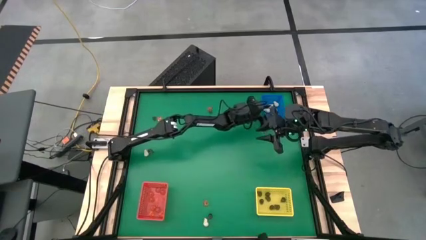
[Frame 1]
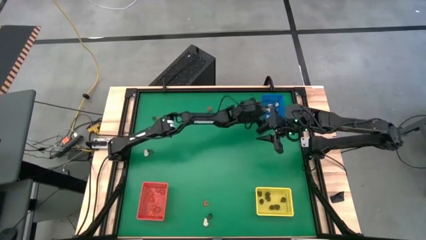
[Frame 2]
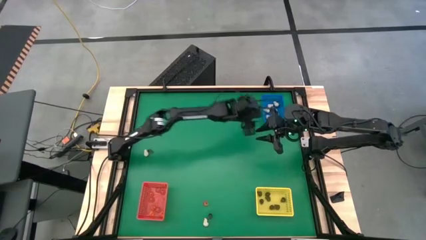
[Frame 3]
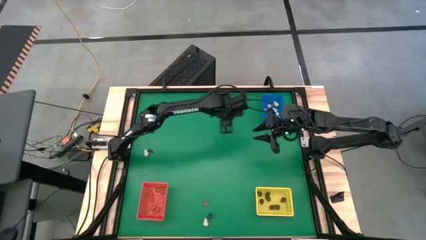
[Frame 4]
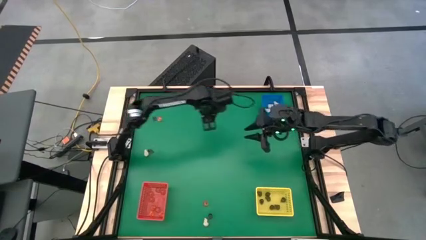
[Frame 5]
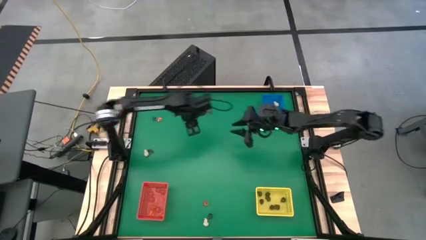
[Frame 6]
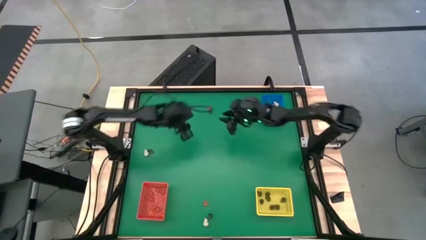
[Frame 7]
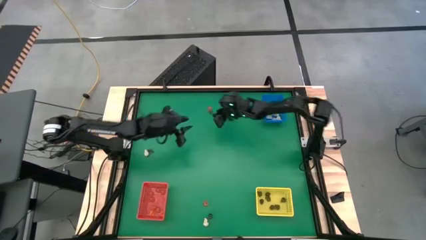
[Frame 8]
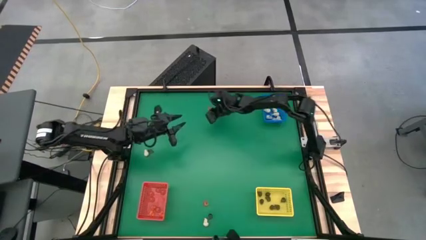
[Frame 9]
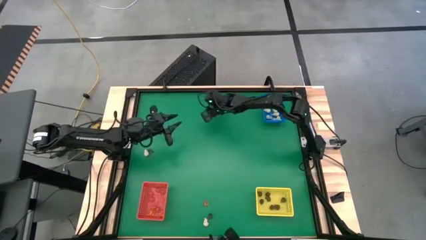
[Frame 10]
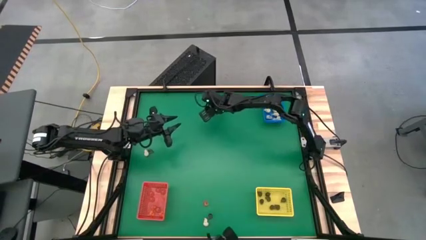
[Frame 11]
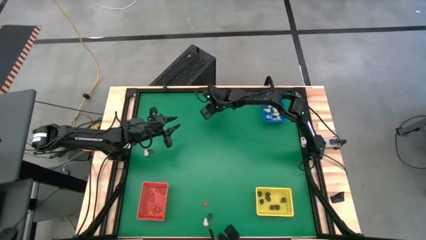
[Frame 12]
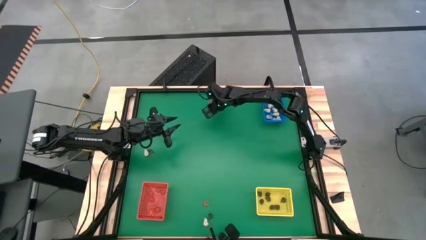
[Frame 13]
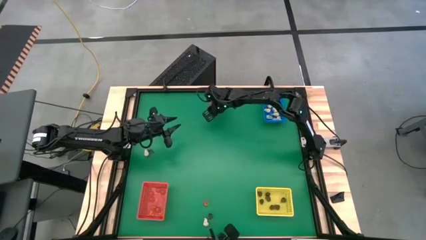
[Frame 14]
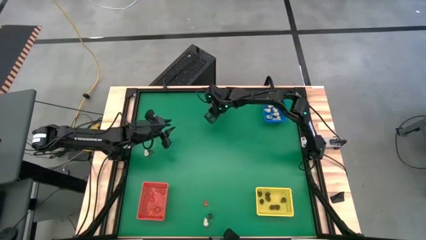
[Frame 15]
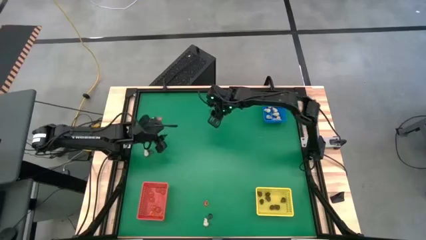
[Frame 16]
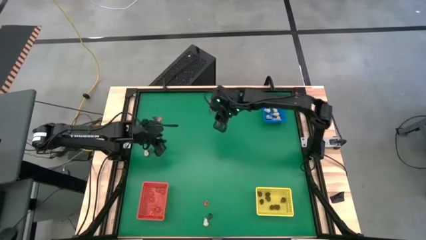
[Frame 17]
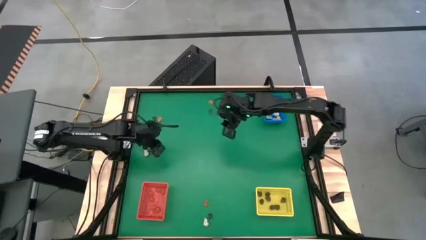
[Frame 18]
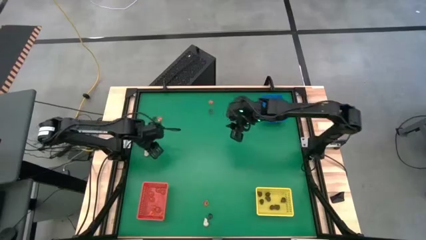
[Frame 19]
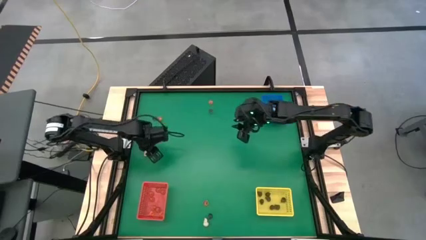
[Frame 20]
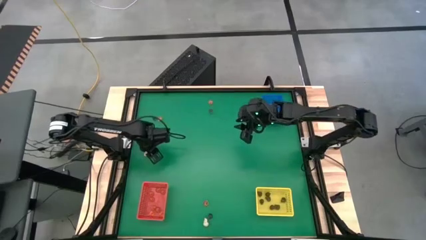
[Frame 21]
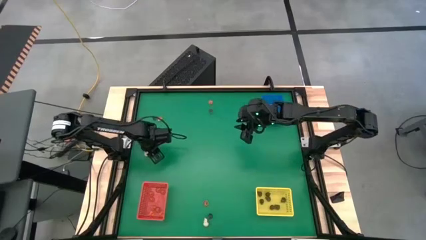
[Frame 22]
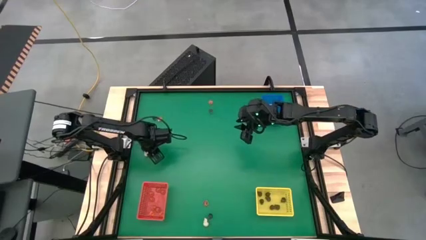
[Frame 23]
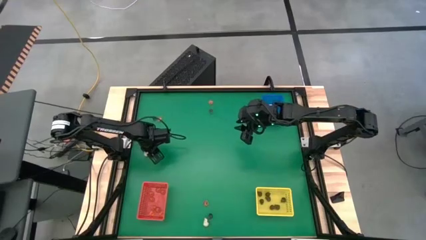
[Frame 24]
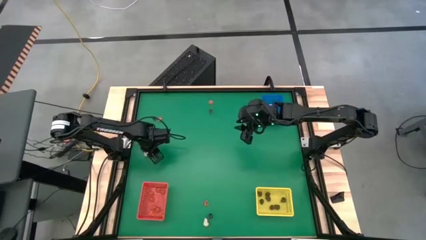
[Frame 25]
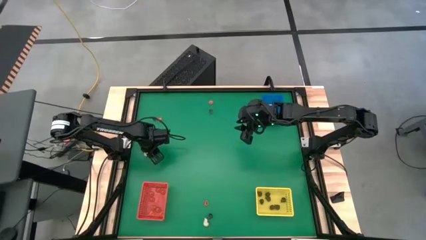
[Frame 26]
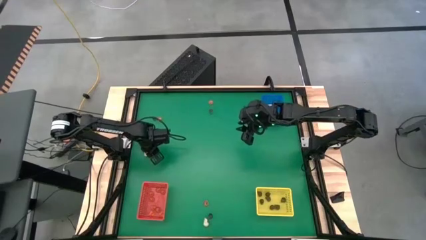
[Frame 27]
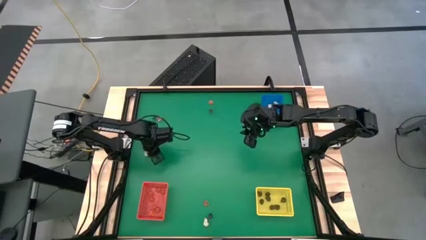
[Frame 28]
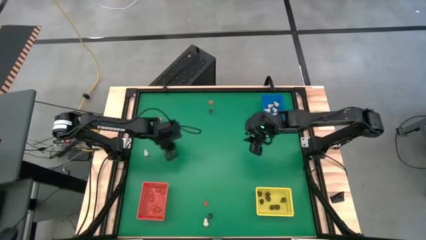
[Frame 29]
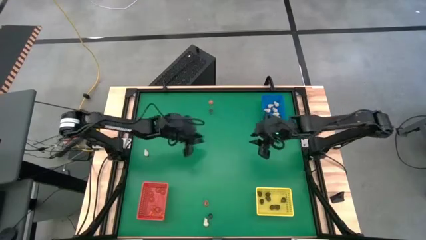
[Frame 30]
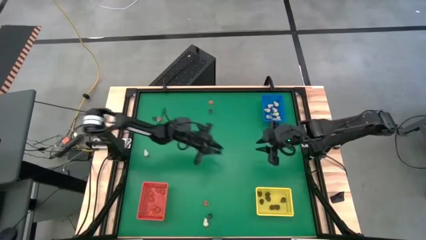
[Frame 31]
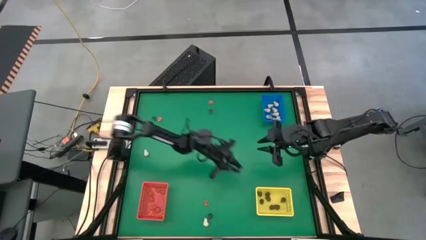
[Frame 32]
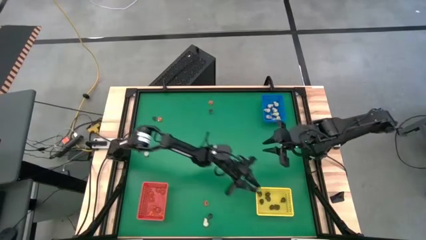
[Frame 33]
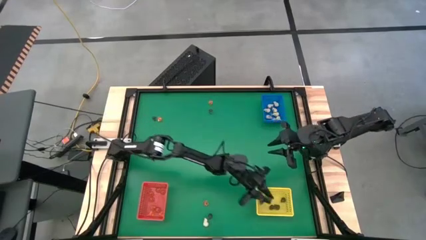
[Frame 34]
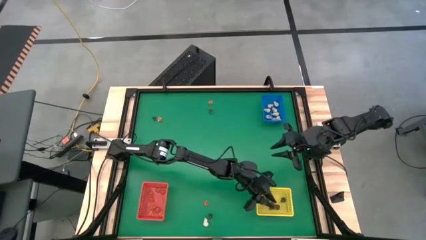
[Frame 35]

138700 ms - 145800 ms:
Task: Sort Halloween decoration
Put the black skull toy into the yellow bin

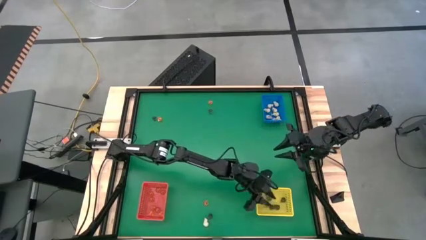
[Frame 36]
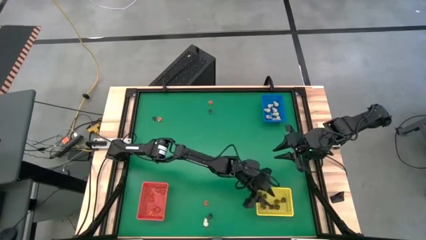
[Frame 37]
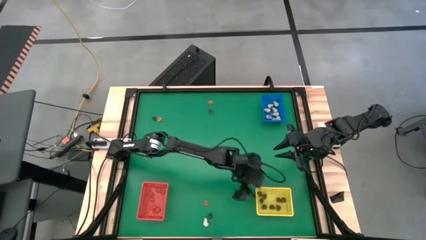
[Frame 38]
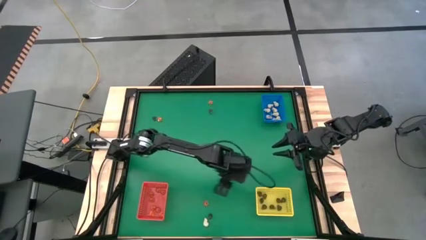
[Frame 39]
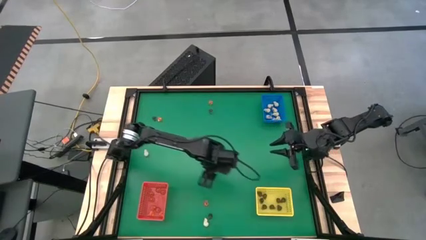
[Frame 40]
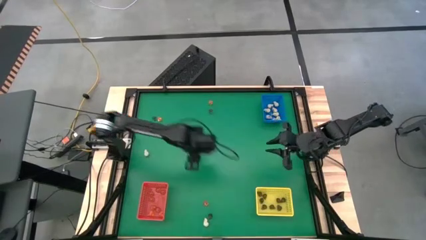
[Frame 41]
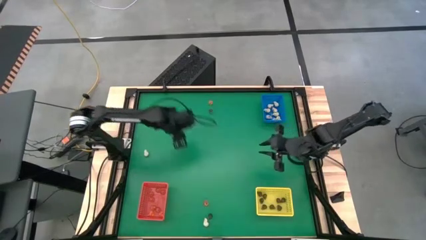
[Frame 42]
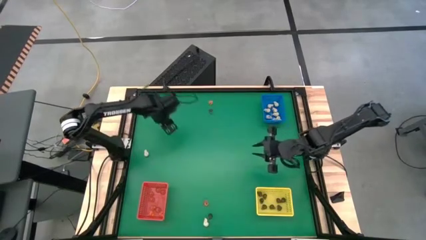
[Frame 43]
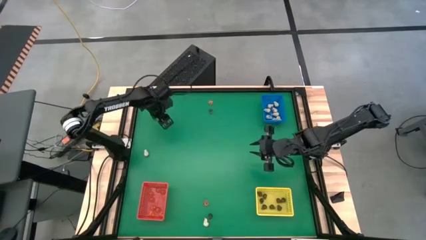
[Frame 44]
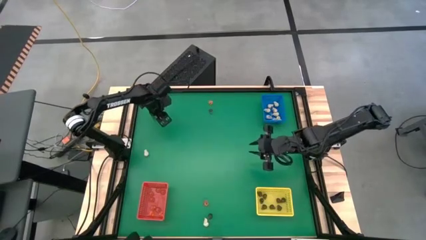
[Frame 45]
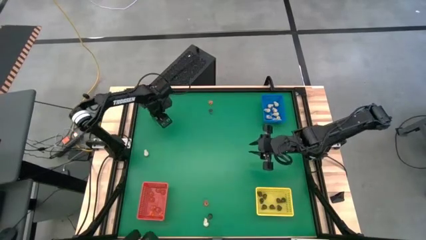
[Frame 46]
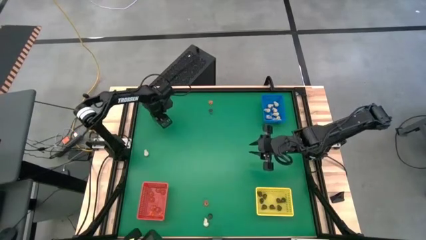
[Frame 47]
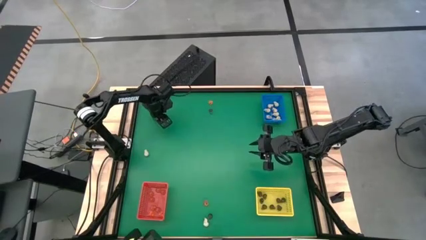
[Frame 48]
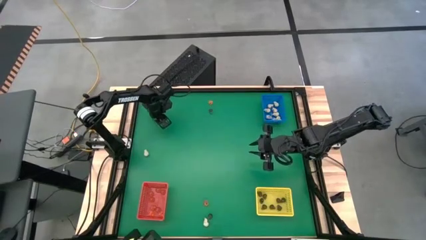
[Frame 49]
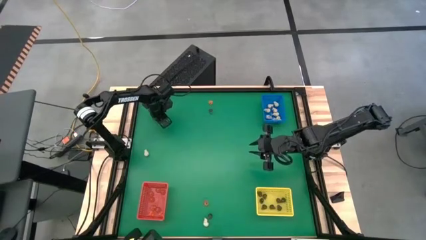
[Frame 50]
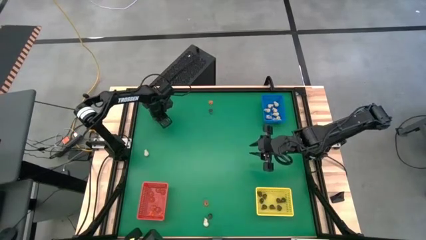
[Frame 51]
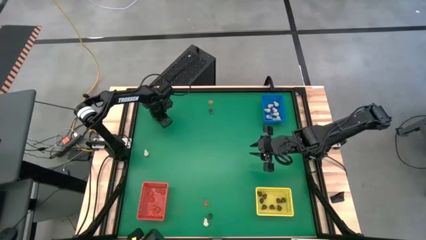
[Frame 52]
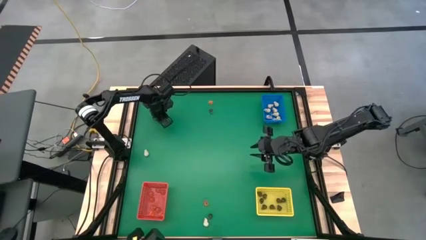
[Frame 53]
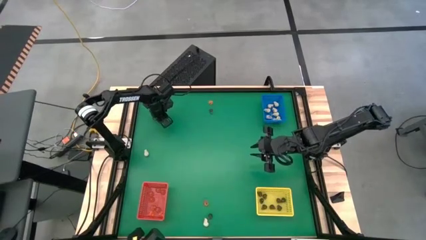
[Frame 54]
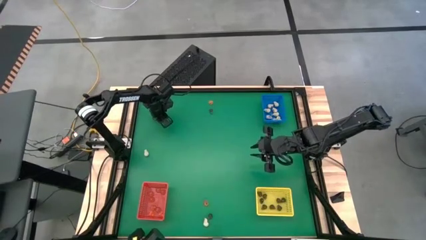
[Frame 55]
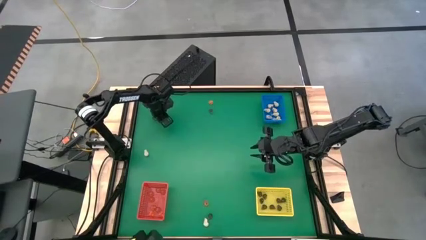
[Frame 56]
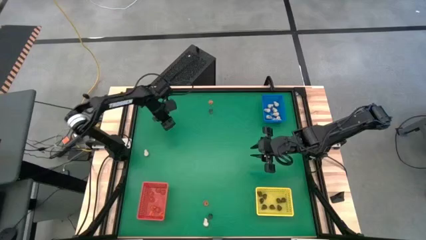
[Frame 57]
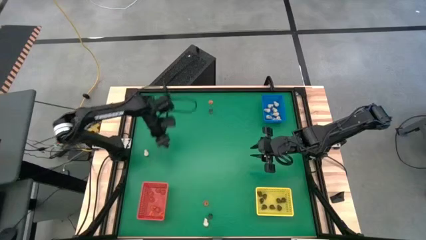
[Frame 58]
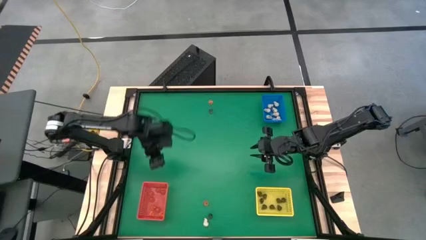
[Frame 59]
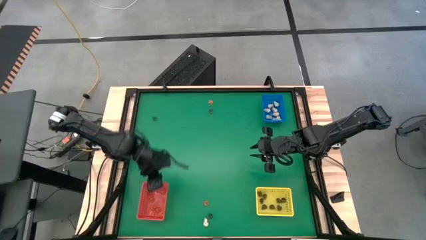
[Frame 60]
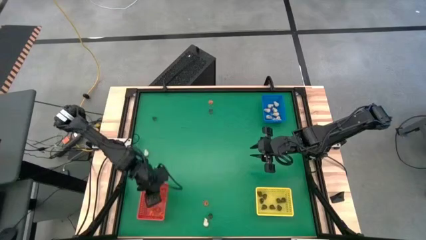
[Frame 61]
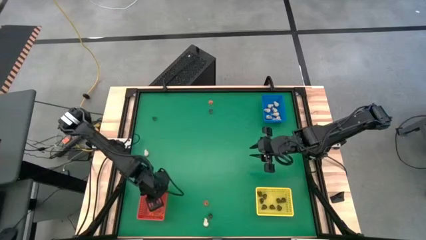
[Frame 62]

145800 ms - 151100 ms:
Put the orange pumpkin toy into the red bin

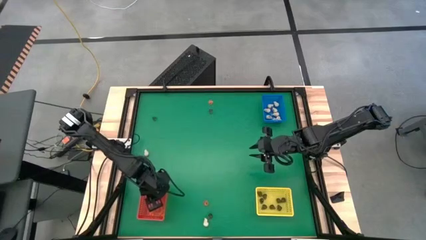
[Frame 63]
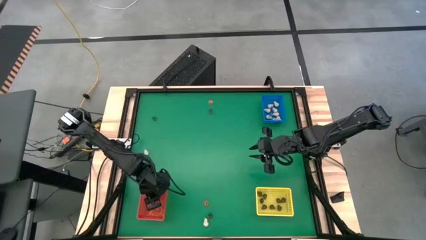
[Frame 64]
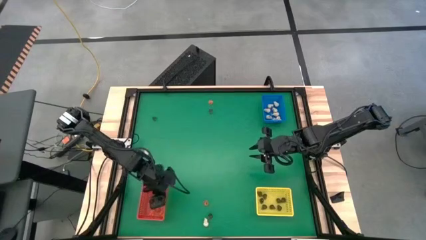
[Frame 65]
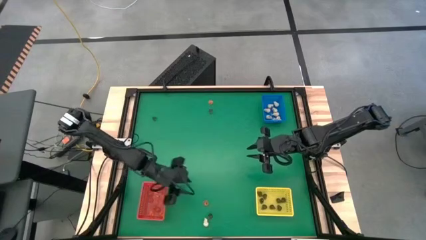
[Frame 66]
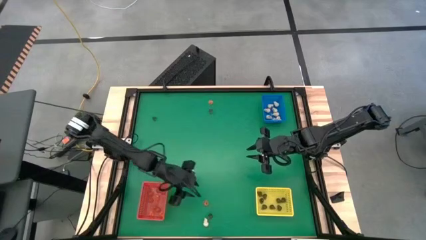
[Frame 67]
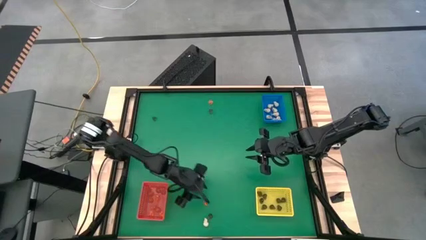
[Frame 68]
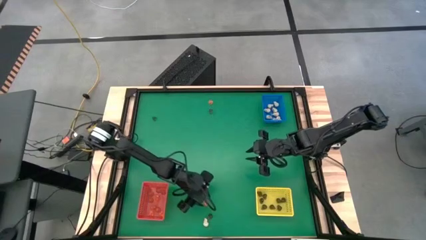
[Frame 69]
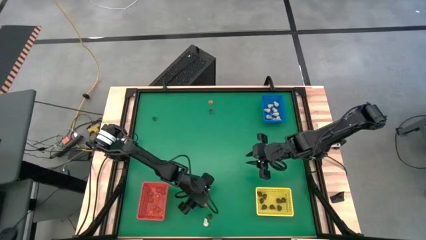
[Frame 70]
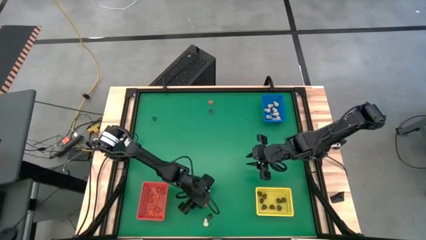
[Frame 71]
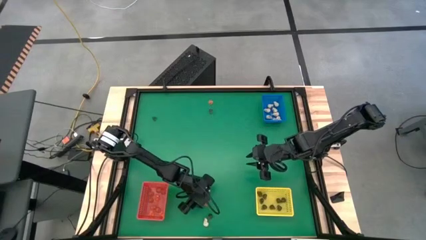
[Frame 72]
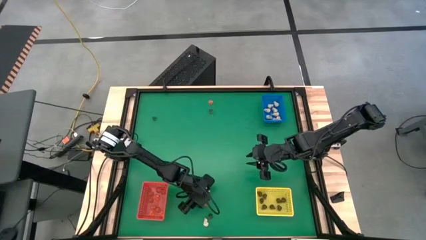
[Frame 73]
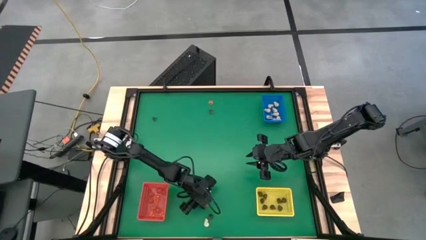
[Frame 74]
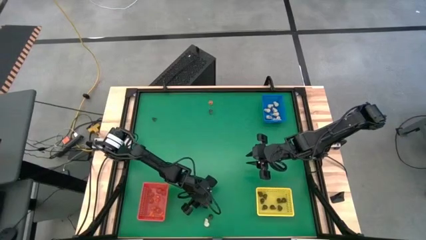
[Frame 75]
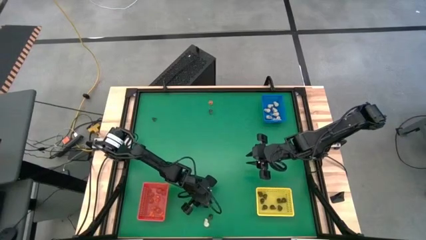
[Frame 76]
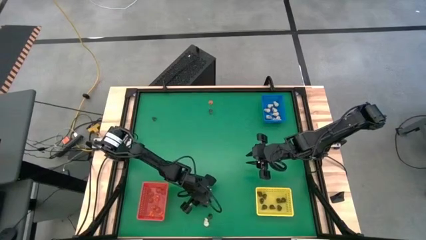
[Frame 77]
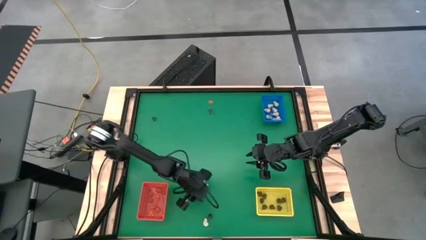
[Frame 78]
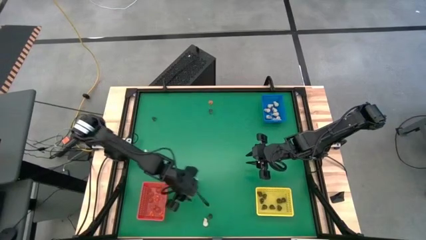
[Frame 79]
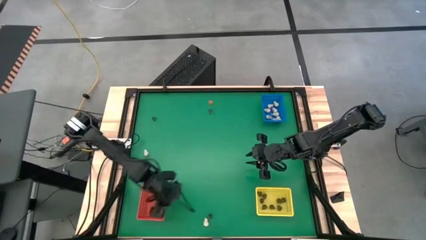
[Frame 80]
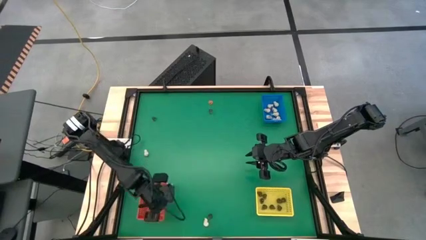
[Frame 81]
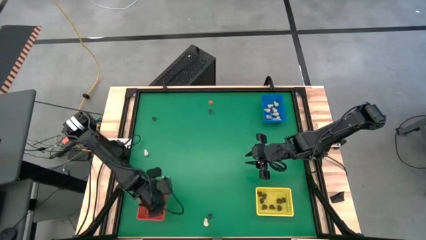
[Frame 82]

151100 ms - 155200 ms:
Put the orange pumpkin toy into the red bin
